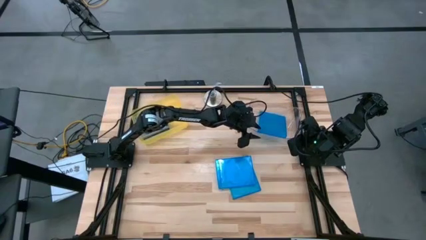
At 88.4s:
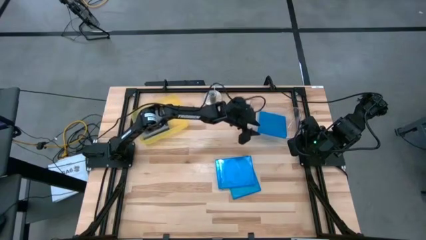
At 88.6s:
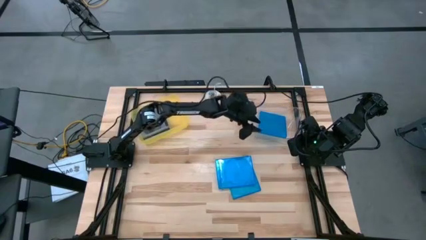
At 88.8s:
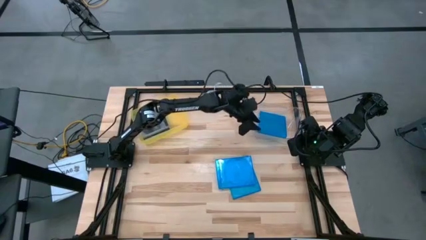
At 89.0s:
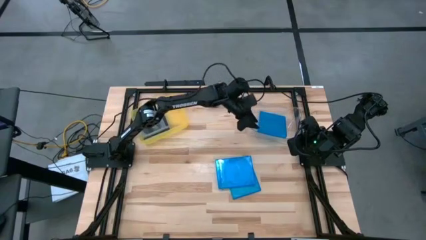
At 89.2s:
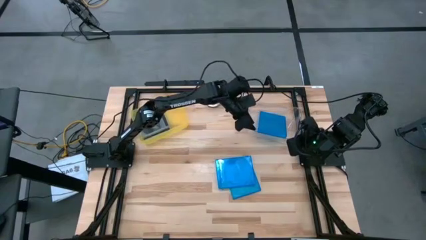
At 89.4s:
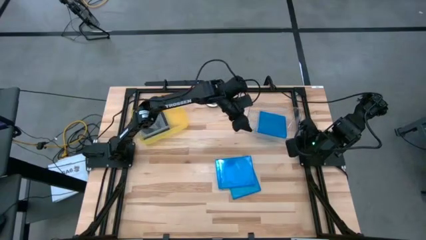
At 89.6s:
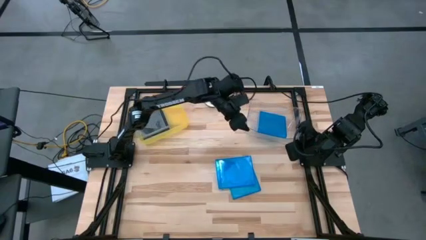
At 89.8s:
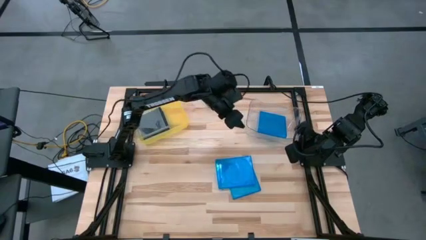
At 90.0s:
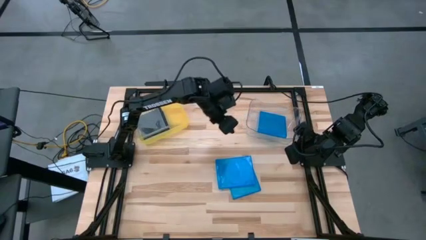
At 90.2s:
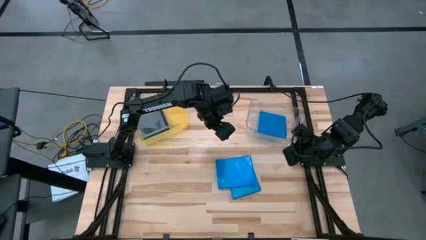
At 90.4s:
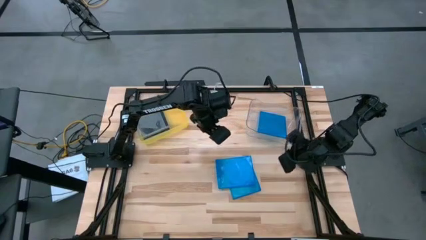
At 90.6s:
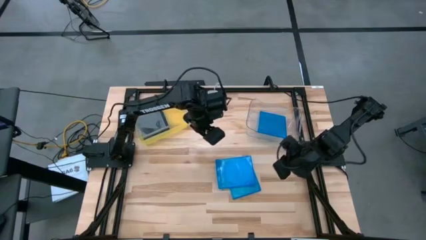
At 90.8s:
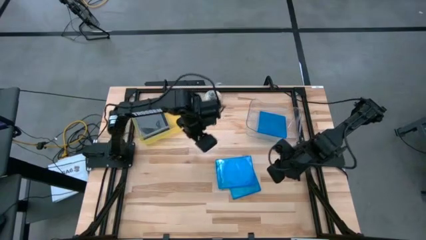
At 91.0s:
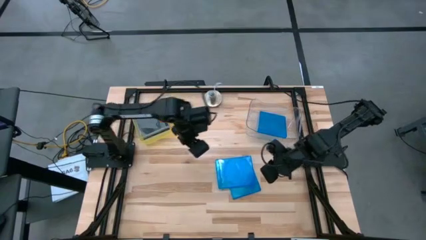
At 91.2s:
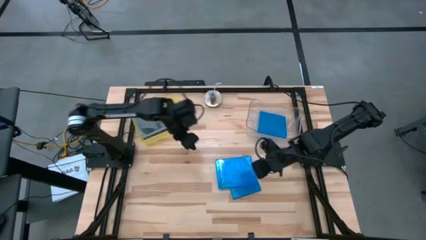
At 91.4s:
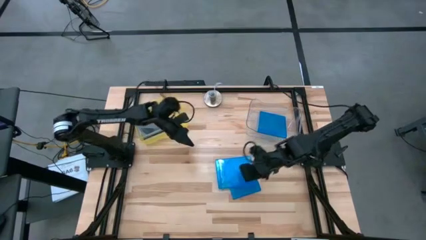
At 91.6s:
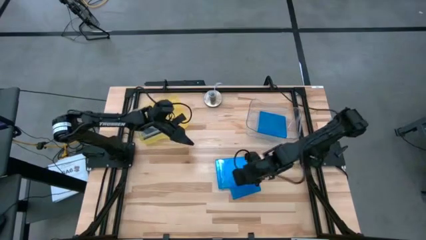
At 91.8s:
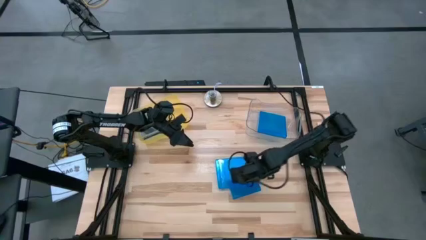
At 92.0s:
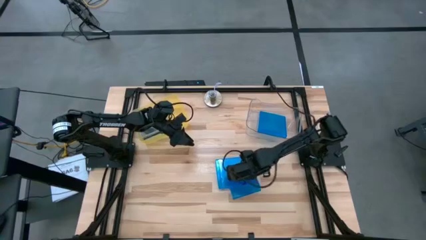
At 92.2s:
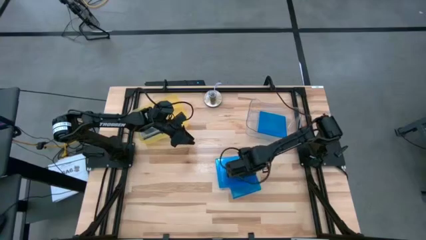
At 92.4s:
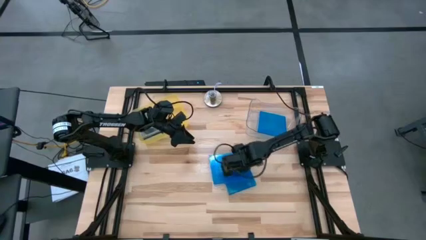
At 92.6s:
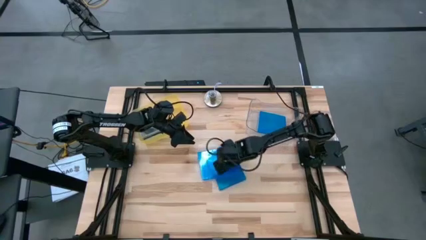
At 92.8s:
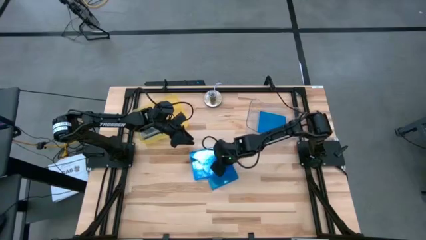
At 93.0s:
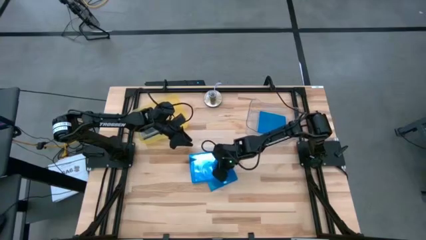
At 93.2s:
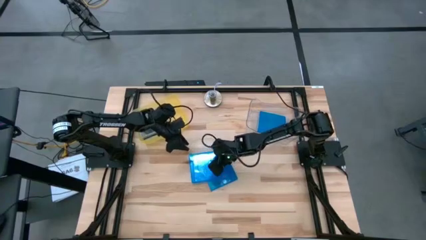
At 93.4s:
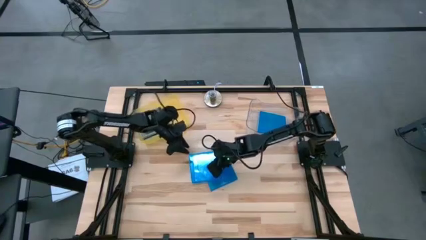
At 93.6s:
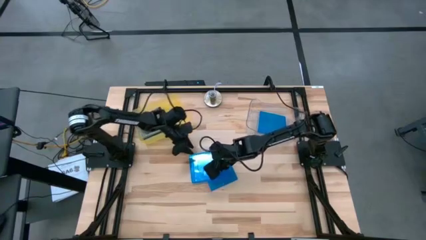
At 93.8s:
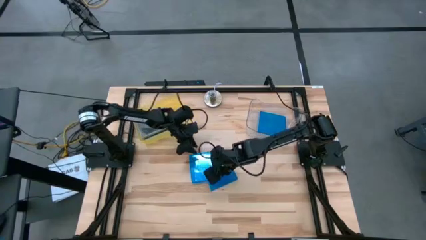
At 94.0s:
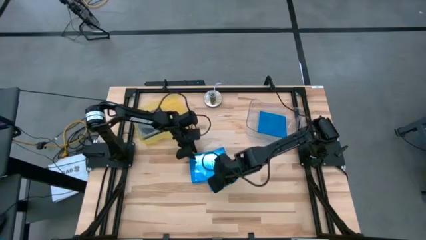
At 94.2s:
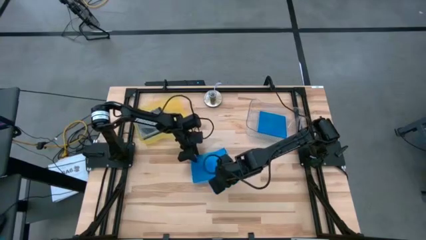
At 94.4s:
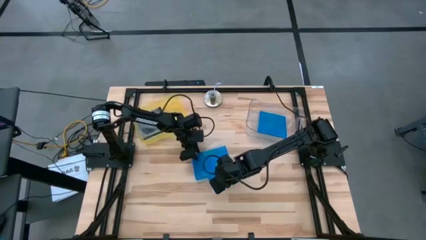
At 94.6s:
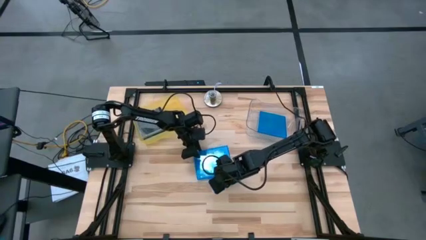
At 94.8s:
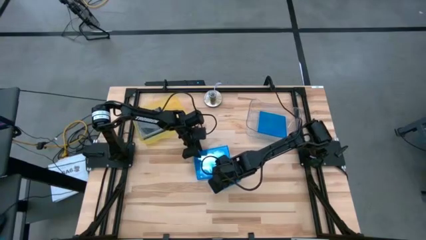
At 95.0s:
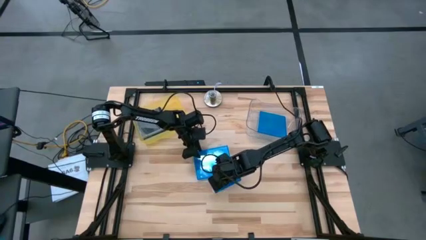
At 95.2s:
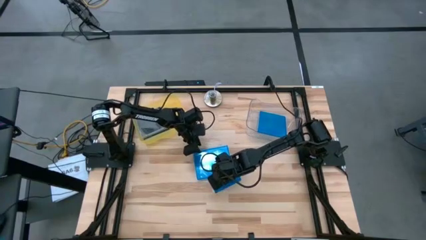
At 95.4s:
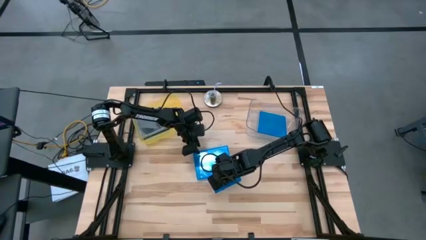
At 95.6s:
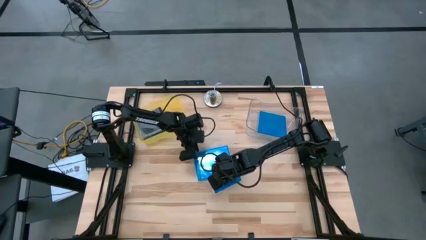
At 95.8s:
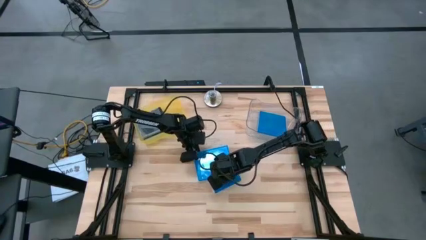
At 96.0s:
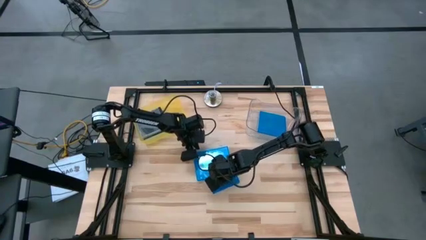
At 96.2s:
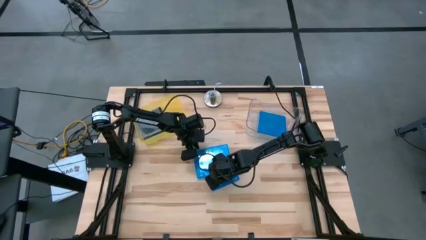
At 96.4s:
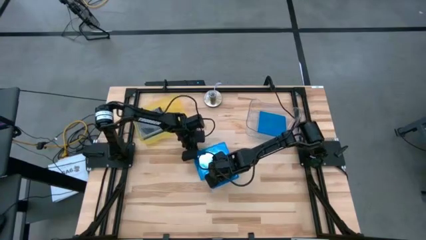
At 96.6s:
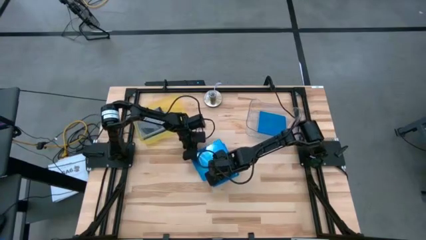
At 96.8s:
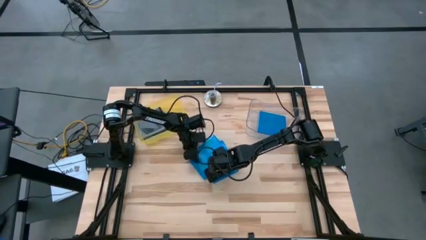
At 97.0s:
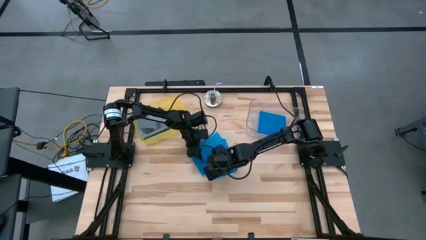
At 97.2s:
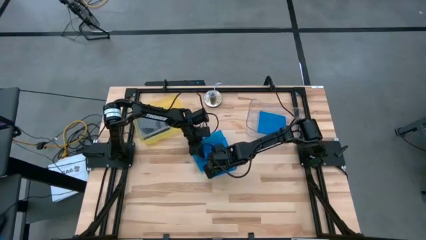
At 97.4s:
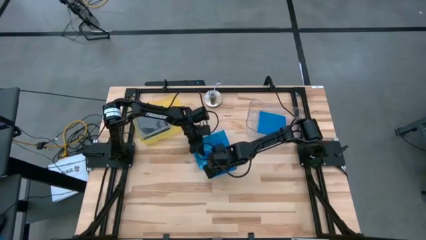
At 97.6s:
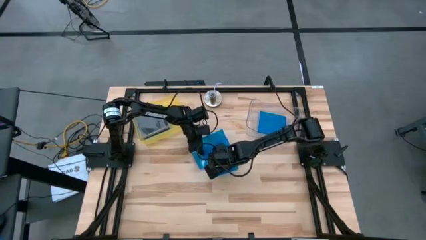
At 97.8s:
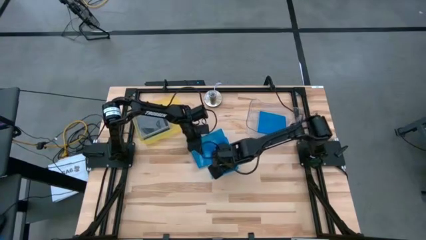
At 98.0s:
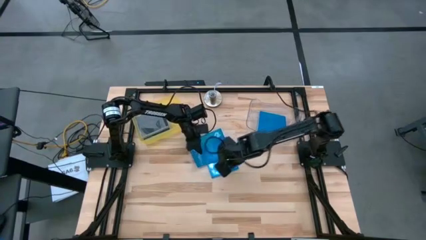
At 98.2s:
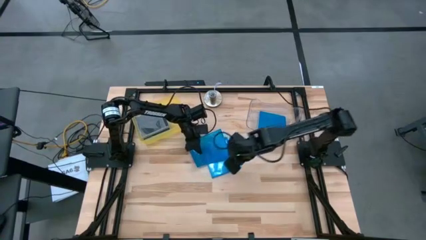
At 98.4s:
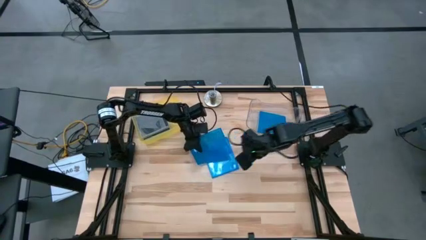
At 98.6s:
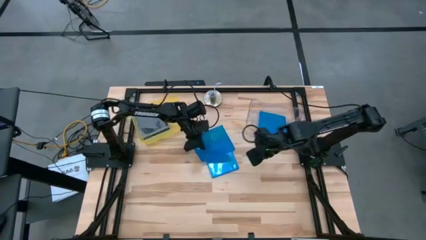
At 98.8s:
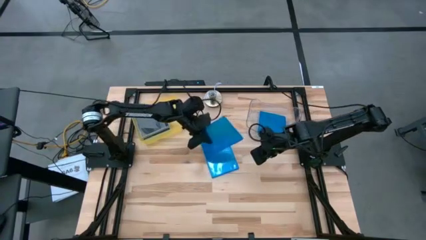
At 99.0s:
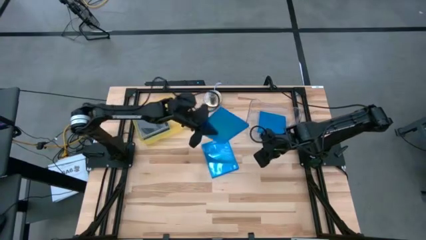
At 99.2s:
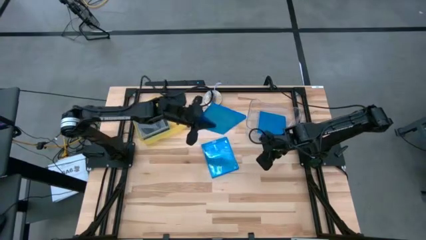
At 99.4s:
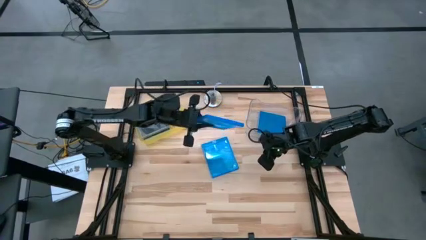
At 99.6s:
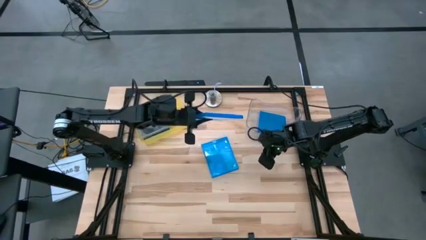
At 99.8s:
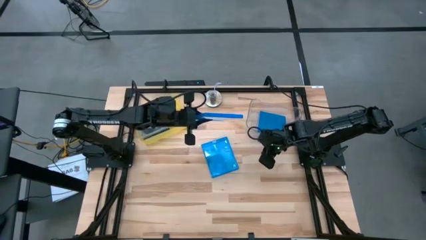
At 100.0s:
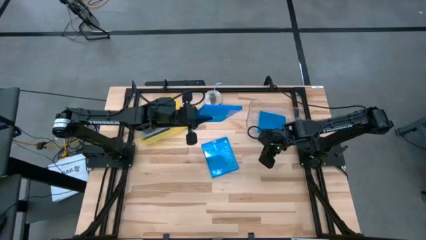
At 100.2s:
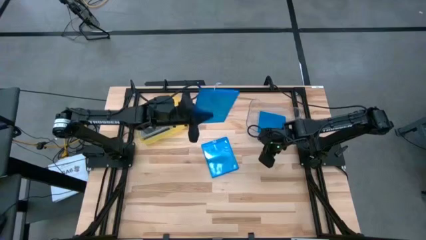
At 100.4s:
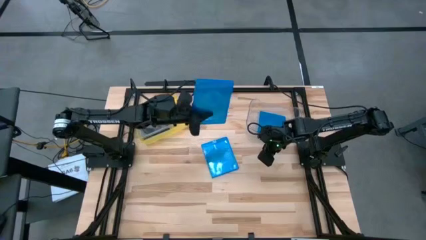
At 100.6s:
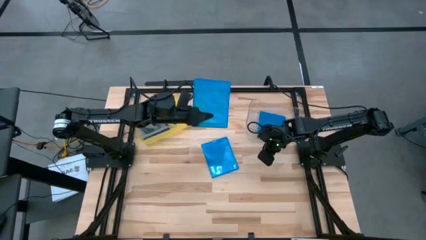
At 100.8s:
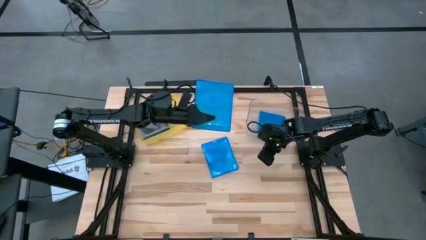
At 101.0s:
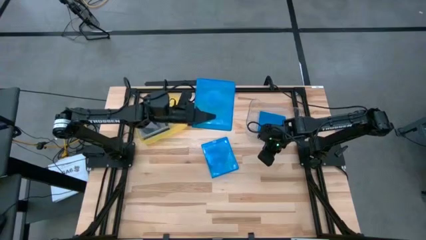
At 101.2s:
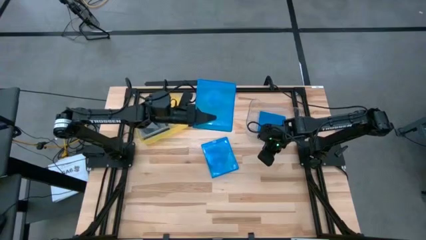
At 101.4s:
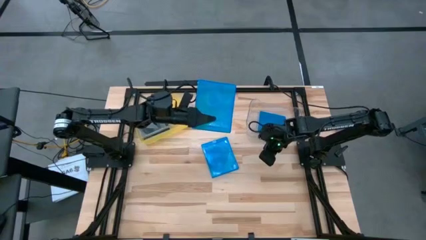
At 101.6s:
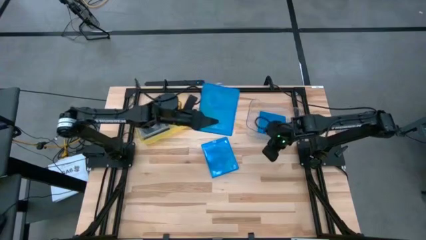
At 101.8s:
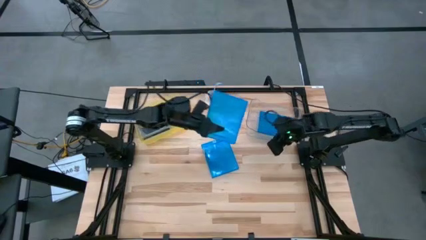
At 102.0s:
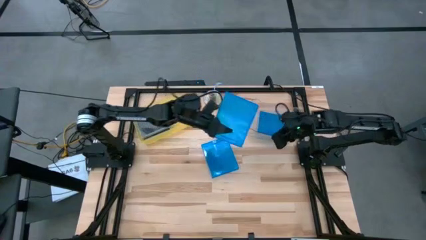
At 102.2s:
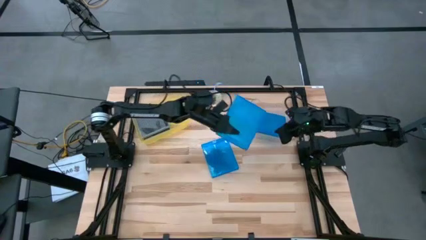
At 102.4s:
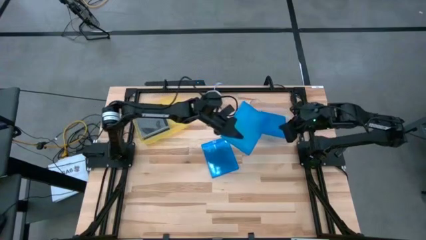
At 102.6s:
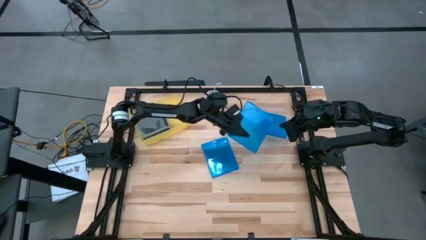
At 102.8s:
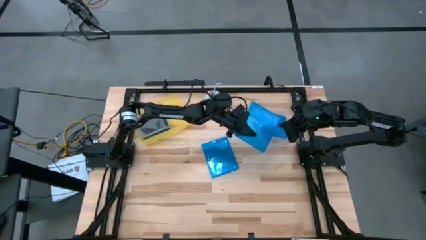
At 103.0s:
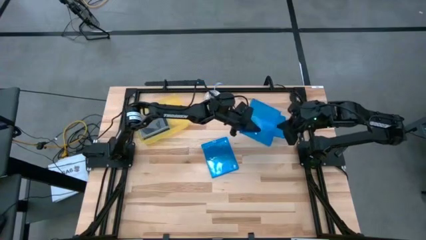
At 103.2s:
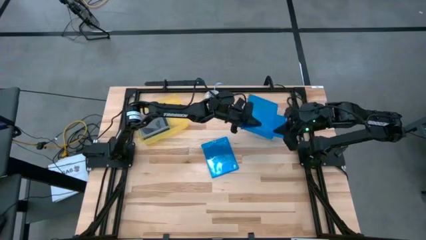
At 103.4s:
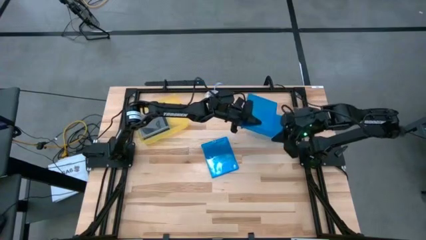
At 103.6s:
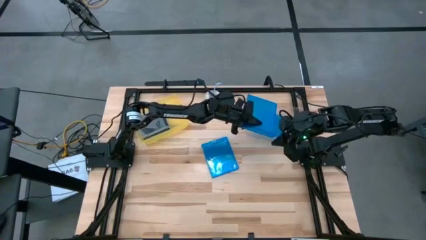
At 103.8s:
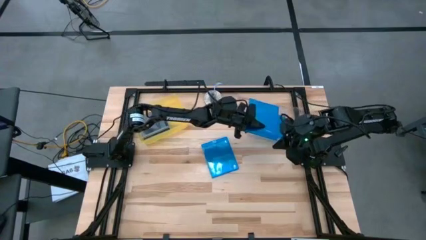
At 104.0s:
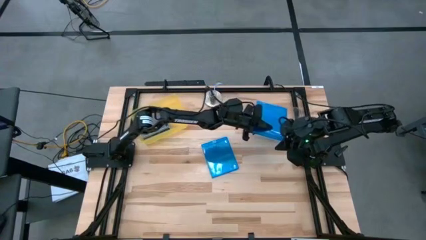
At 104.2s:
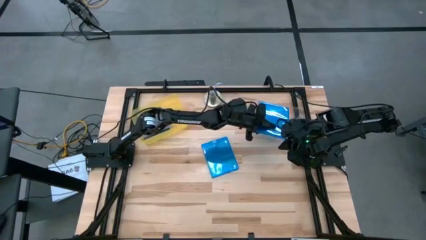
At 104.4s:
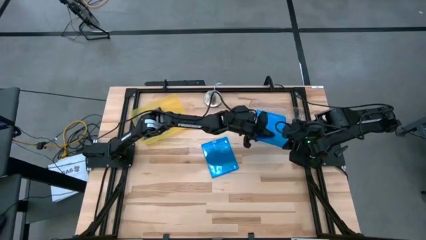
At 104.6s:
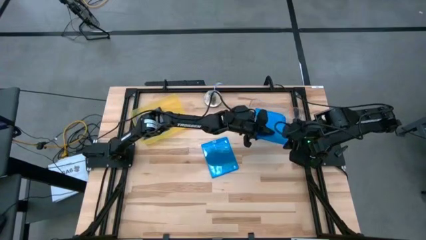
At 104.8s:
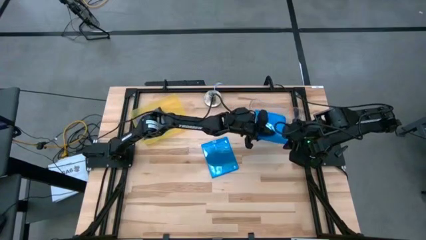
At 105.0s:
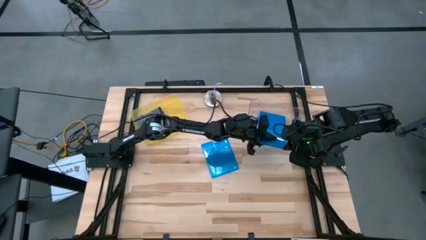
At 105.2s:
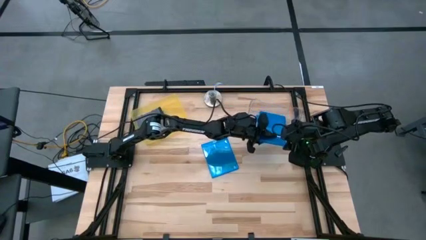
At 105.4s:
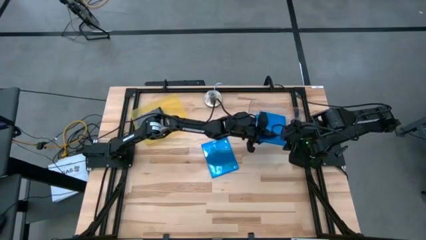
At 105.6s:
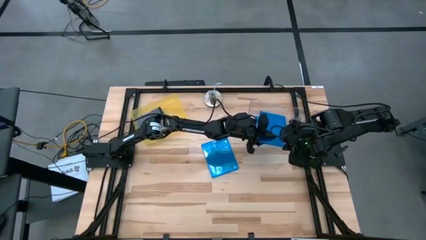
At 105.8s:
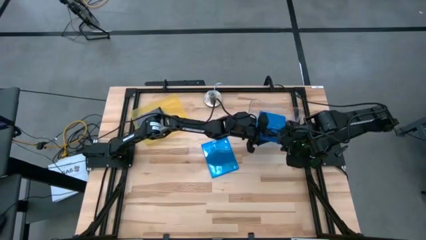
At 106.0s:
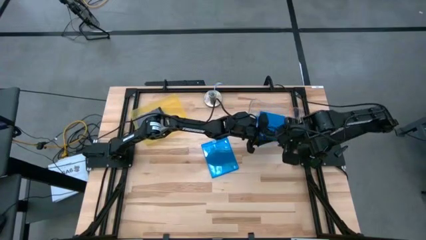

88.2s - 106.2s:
Task: Pick & place jewel cases by type
Put the blue CD case into the transparent bin
